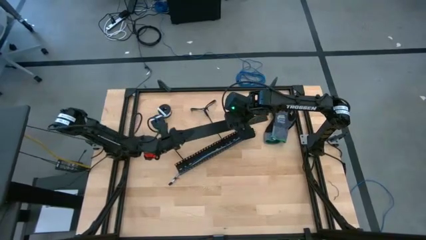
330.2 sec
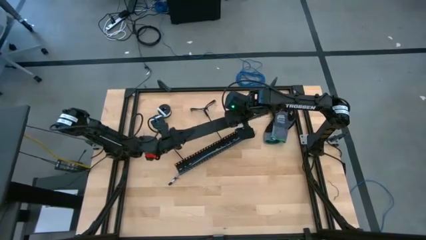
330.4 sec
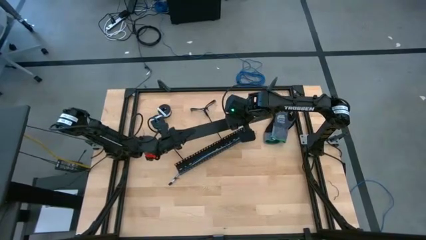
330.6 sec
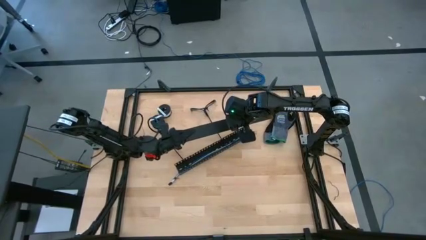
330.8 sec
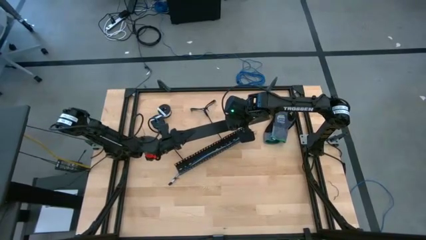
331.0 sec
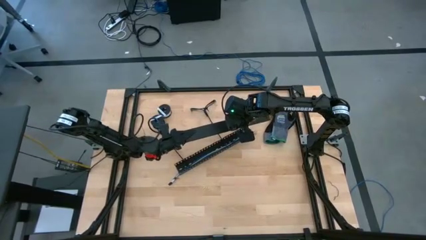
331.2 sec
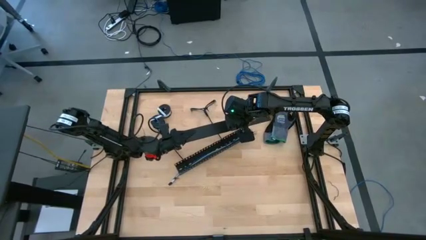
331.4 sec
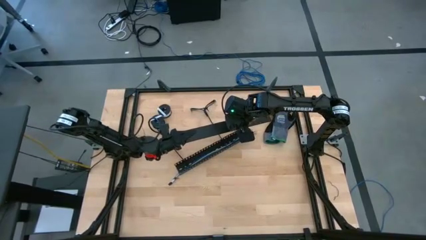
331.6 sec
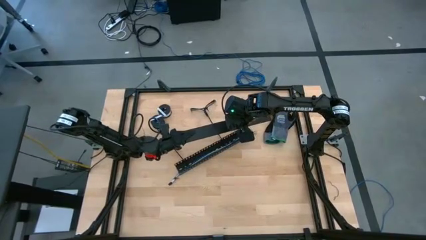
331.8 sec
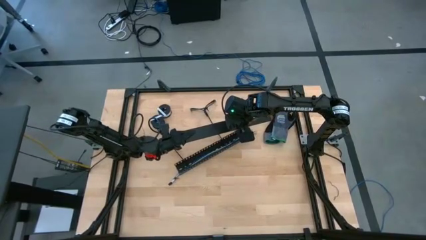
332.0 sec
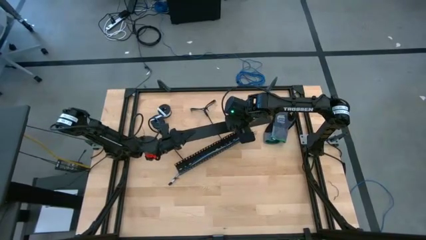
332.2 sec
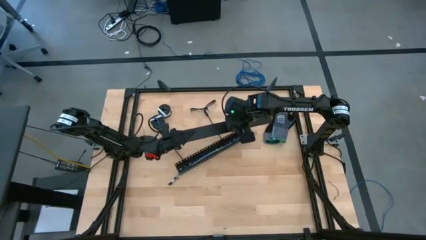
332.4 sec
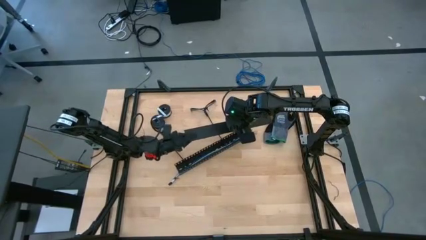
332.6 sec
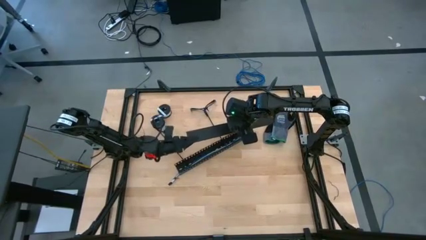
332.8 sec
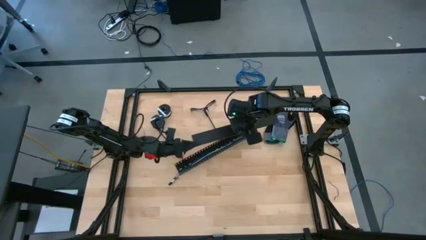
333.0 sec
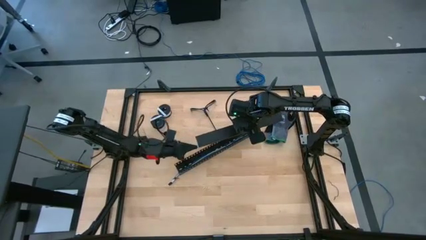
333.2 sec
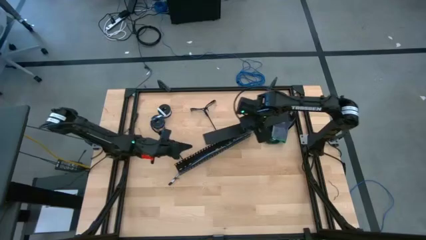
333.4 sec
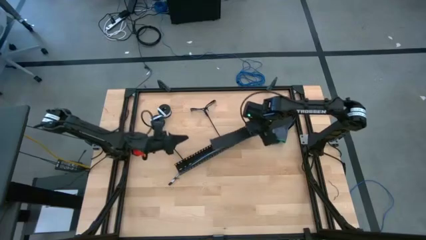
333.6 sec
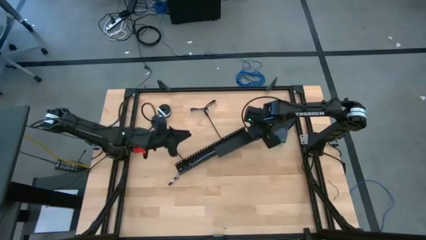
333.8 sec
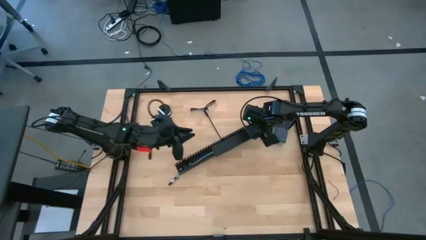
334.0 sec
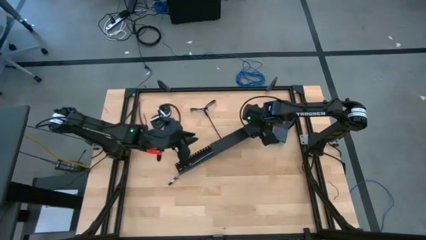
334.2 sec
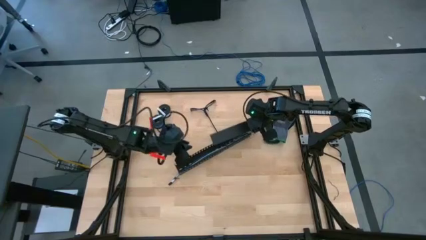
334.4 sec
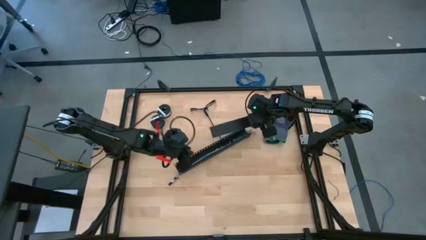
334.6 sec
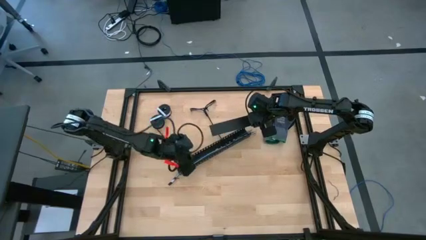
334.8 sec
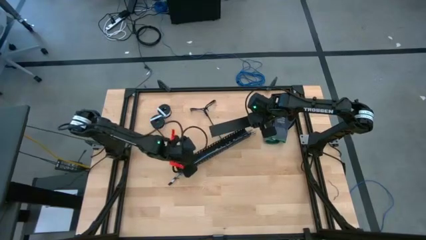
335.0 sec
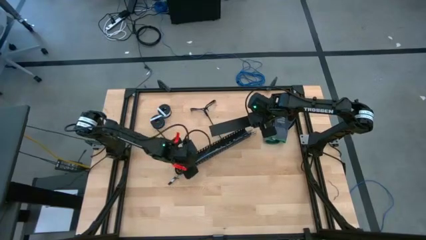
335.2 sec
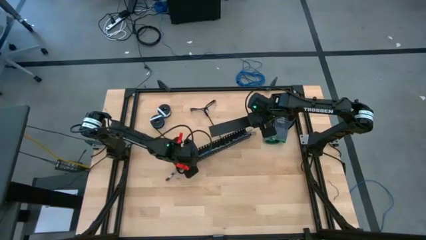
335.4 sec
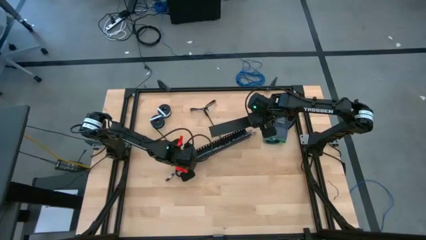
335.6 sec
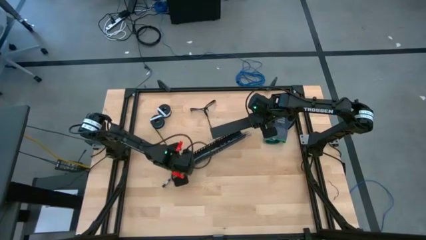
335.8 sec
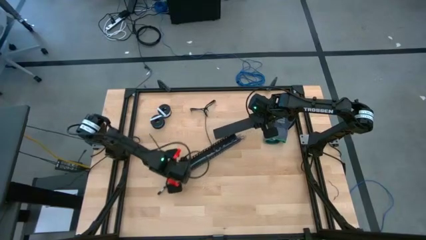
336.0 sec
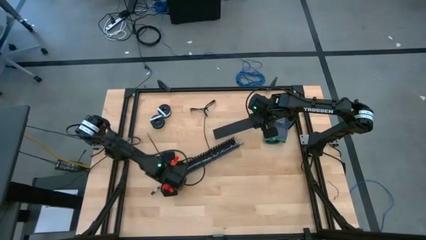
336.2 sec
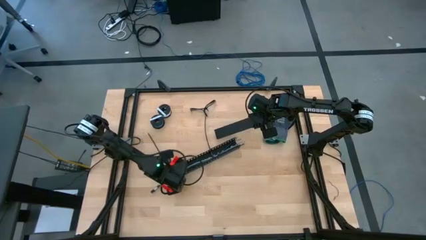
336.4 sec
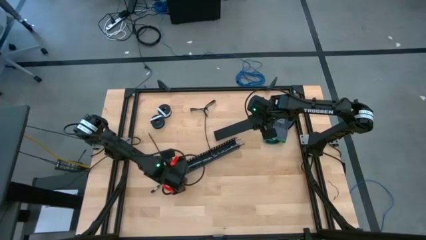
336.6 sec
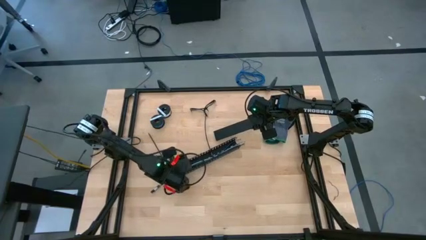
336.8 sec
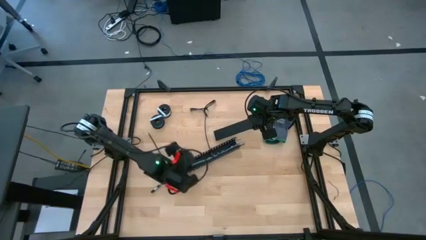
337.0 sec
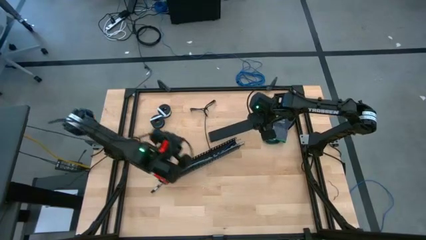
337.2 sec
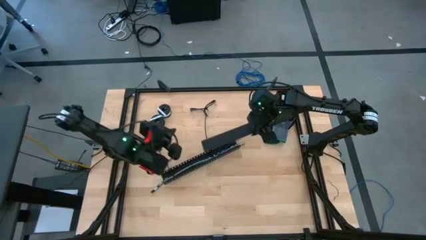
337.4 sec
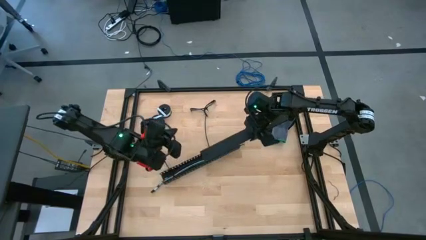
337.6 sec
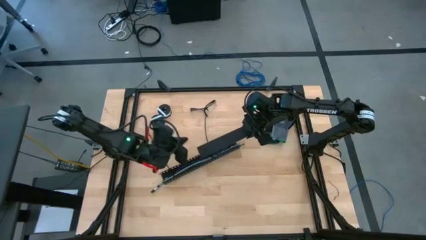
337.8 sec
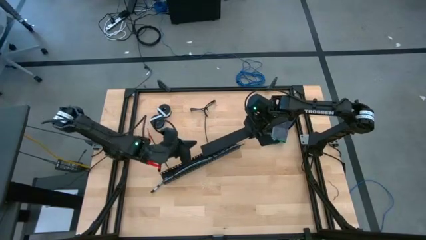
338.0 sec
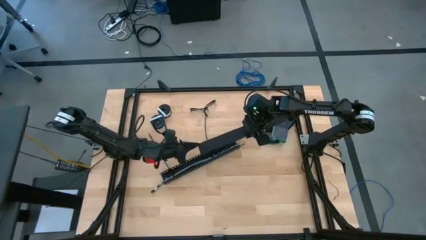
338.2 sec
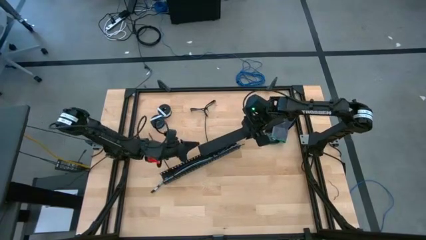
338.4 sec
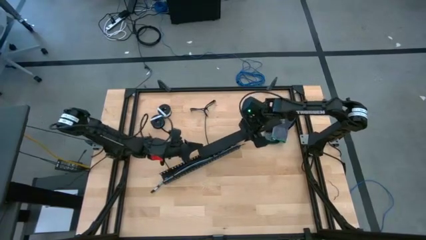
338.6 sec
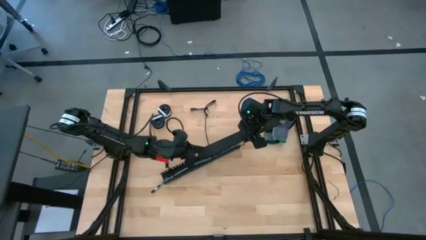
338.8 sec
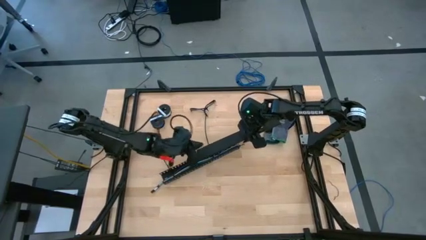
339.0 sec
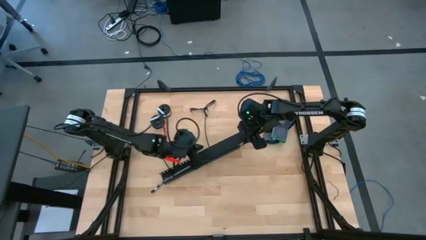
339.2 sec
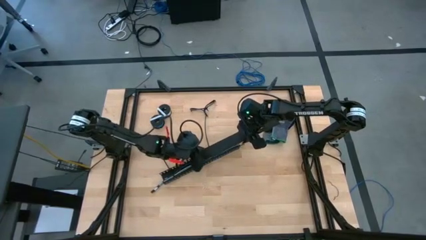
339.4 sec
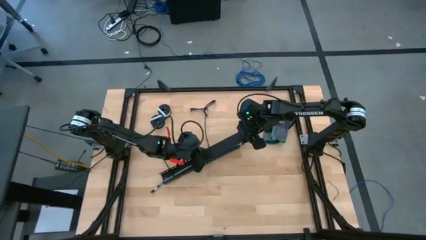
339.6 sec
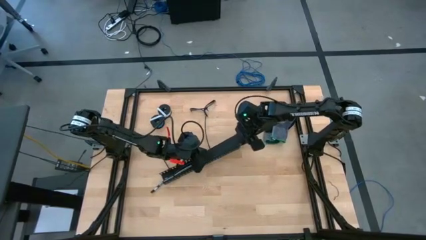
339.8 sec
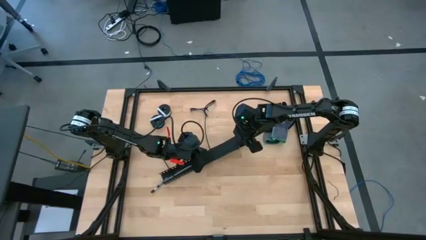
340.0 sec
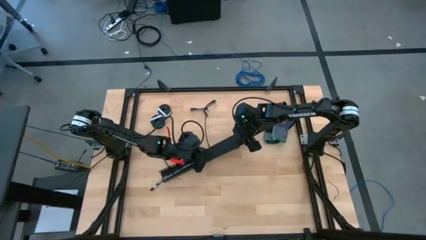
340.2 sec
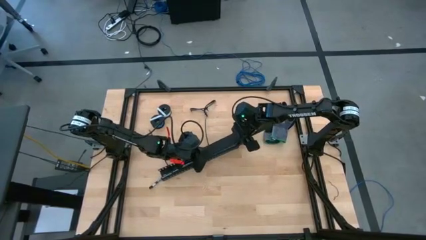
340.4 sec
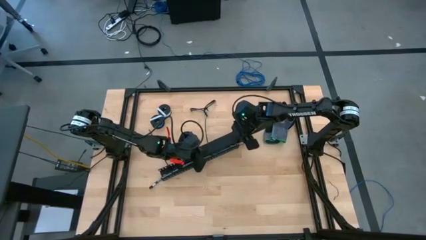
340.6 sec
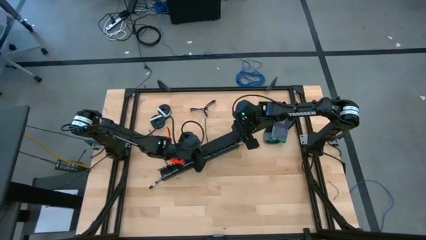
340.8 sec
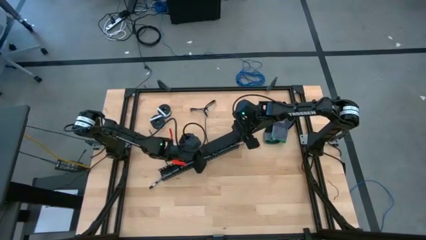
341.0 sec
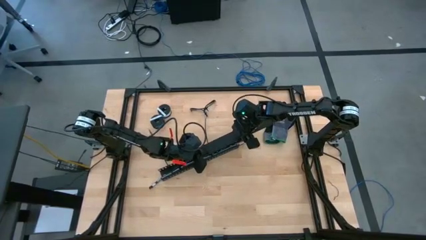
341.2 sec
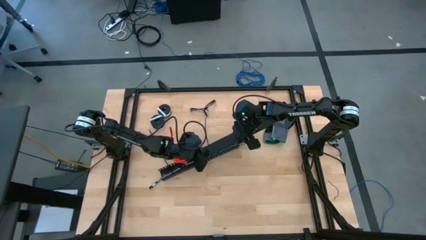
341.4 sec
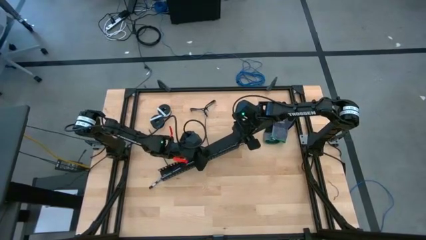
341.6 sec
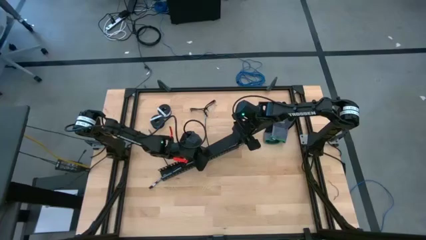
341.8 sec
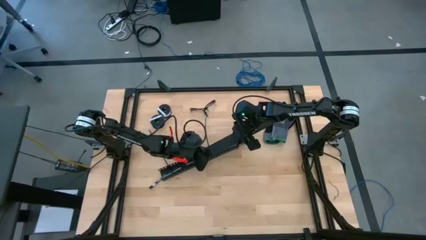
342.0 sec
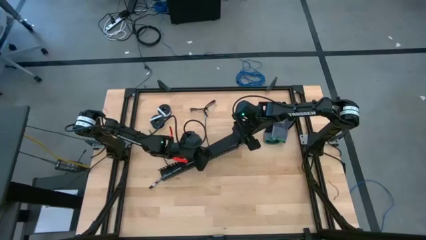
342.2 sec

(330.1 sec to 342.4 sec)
Task: Ziptie cables
Insert the black cover of the black cable duct

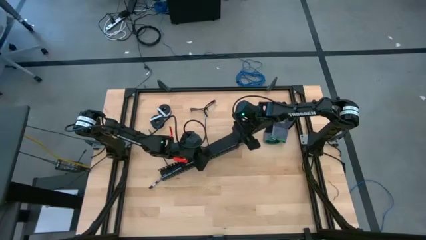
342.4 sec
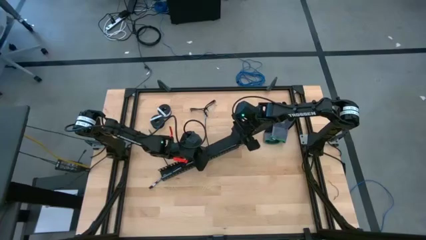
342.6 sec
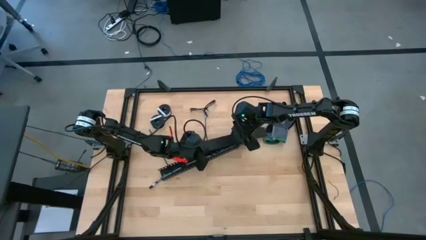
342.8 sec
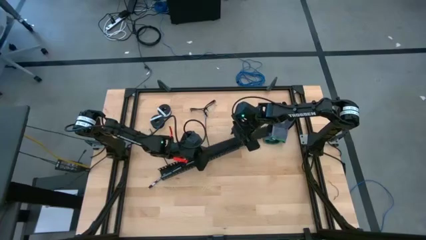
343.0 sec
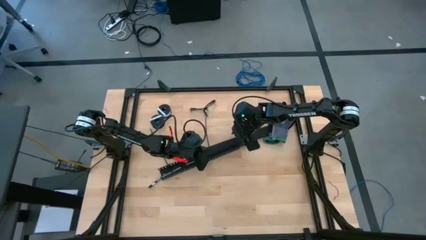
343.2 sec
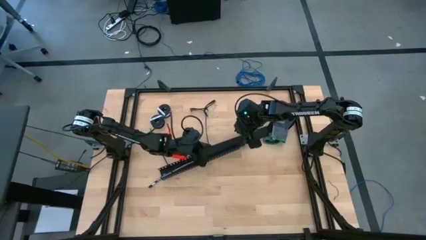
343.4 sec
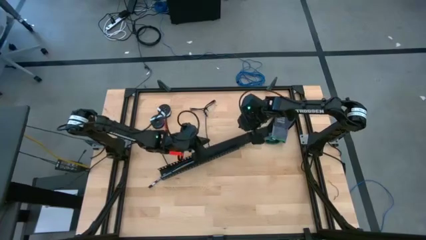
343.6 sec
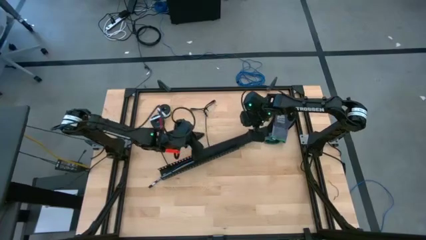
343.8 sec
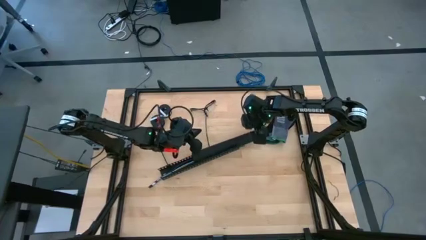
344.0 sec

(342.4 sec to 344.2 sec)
Insert the black cover of the black cable duct

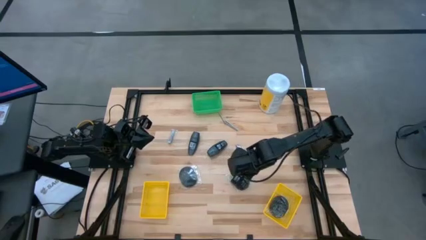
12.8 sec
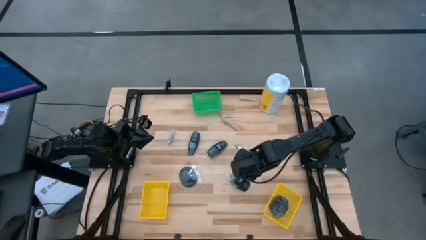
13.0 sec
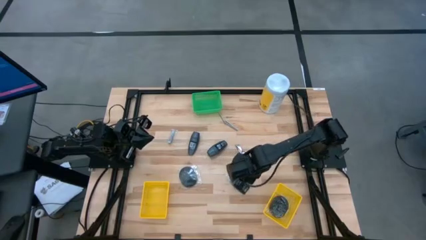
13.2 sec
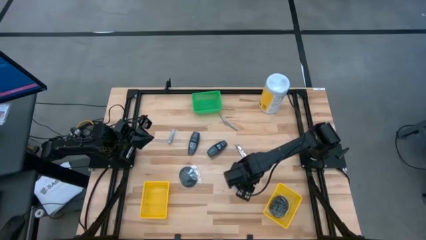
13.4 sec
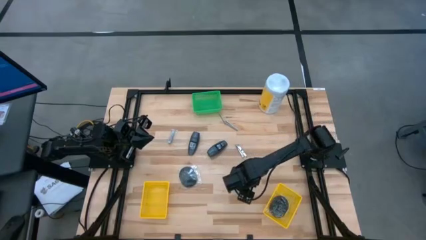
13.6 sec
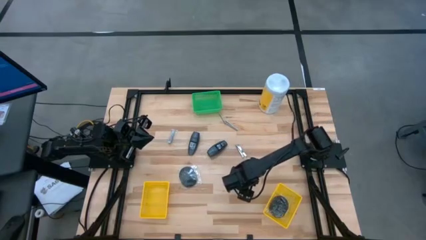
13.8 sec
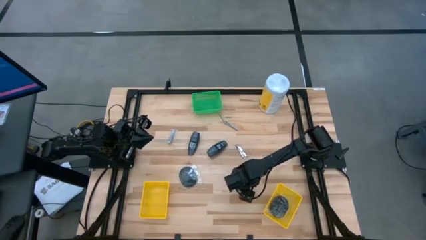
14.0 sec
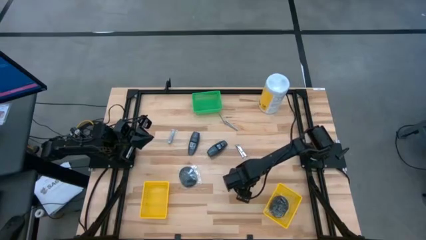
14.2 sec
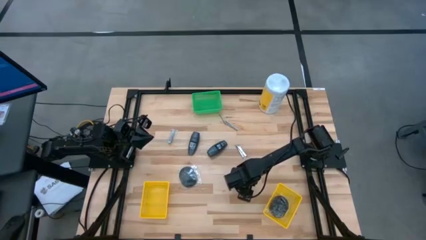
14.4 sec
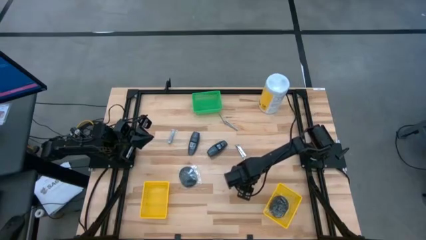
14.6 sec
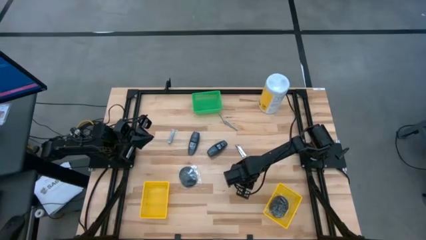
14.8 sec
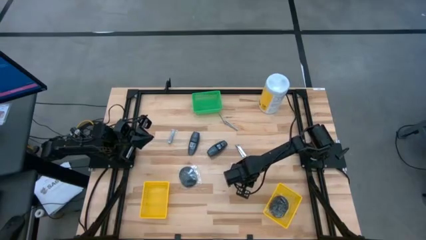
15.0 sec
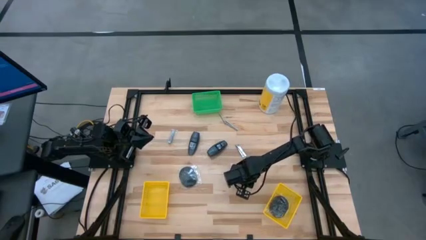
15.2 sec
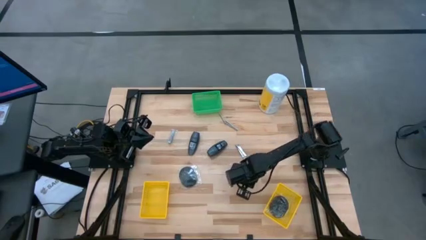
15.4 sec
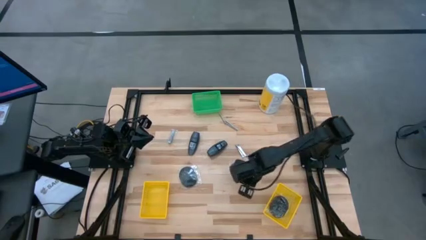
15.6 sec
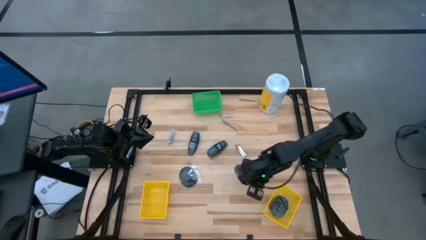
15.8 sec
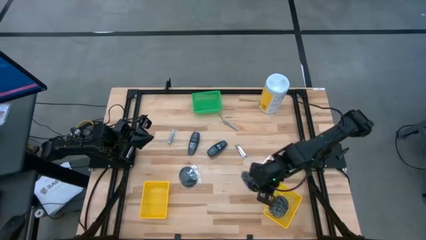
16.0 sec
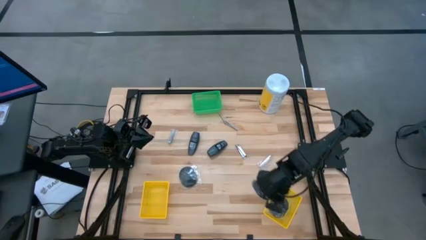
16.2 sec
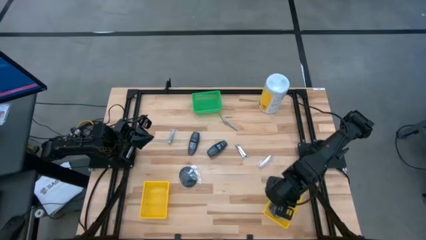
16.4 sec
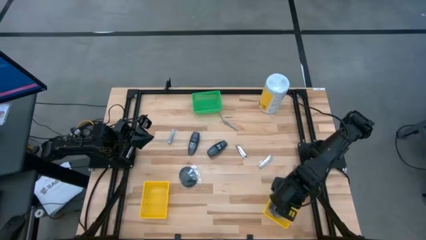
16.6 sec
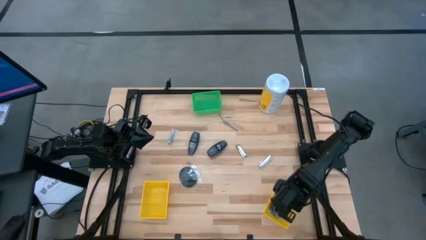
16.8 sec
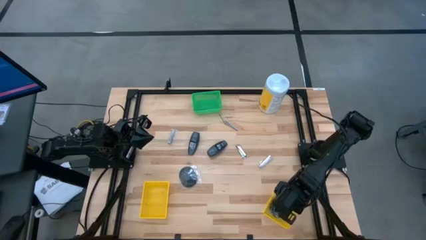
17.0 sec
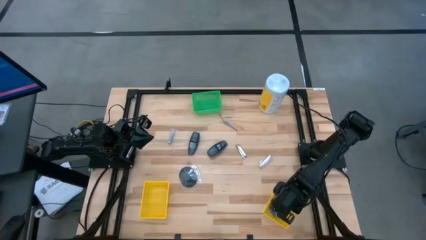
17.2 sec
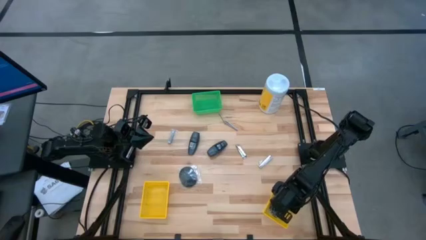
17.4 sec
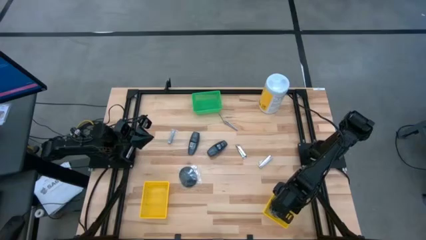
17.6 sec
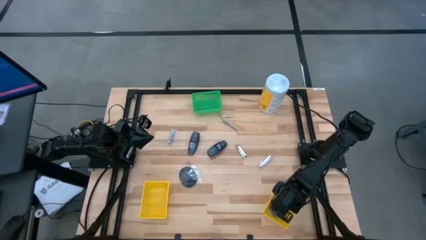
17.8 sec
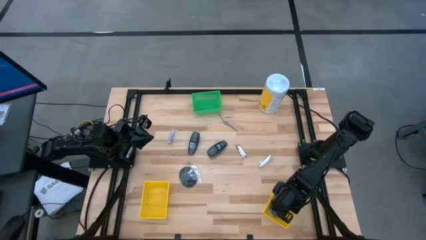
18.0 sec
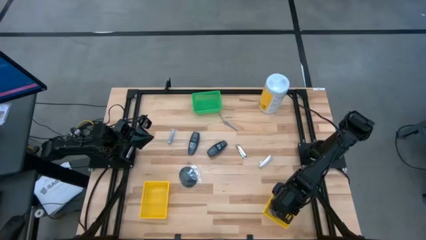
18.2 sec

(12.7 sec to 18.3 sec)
Task: Pick & Place Travel size toiletries
Put the black hairbrush into the right yellow bin
